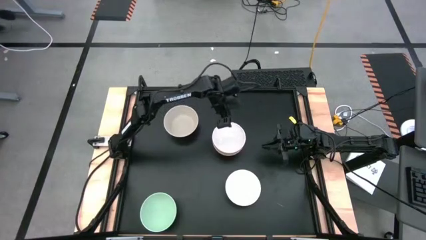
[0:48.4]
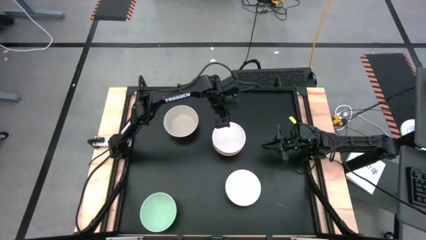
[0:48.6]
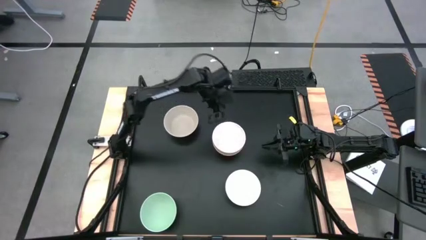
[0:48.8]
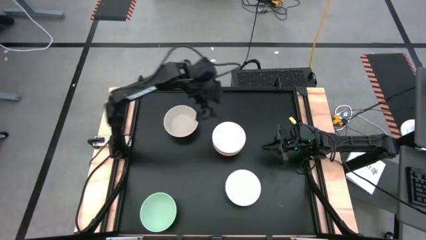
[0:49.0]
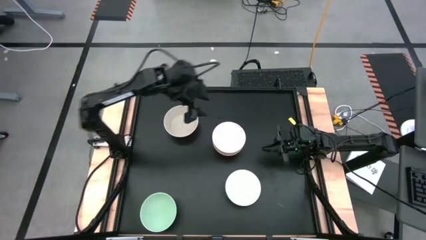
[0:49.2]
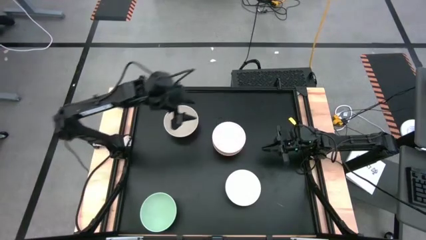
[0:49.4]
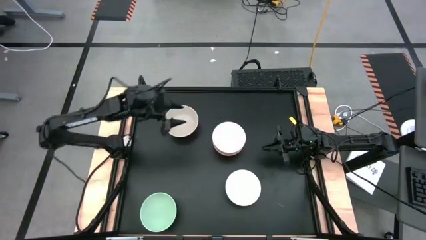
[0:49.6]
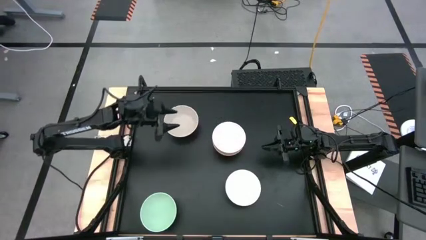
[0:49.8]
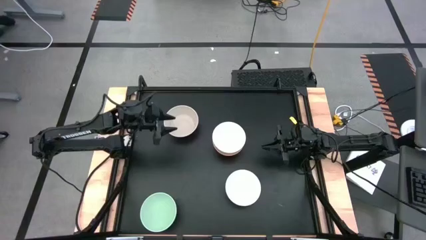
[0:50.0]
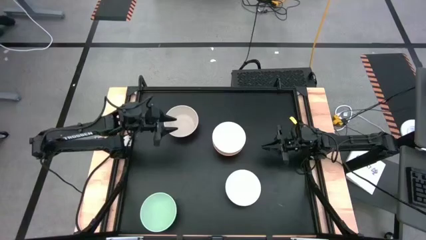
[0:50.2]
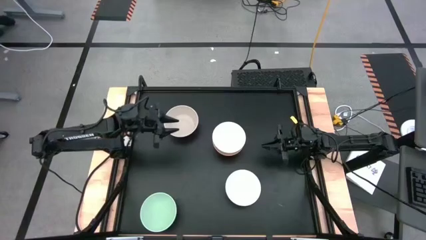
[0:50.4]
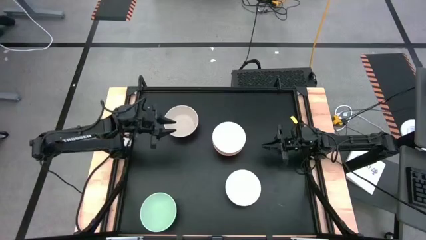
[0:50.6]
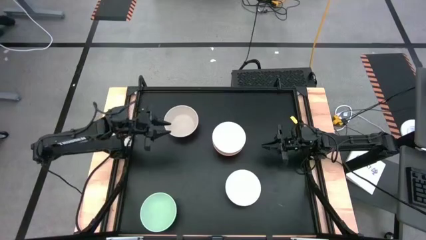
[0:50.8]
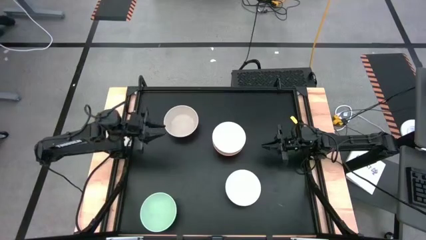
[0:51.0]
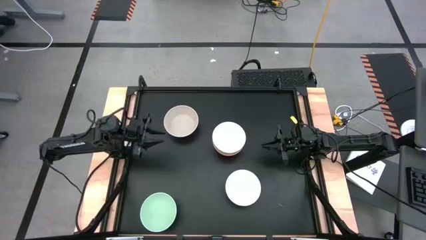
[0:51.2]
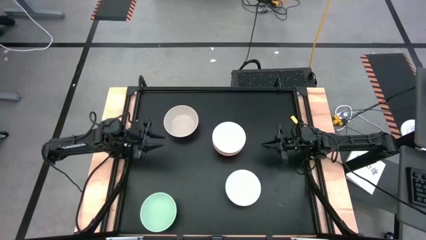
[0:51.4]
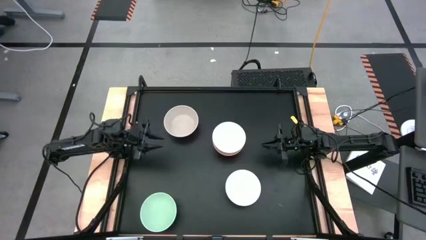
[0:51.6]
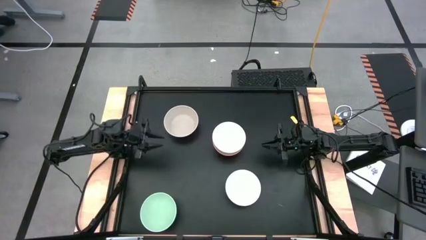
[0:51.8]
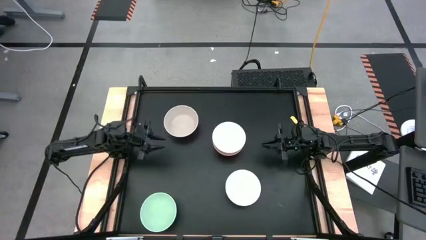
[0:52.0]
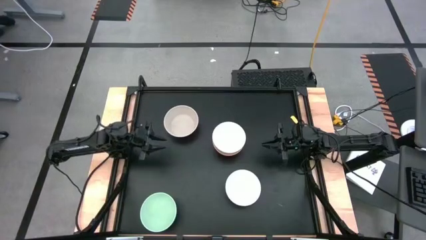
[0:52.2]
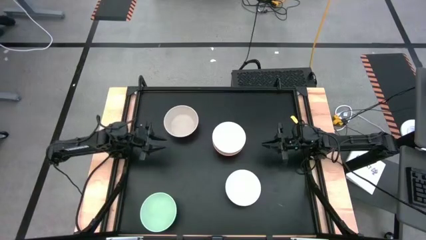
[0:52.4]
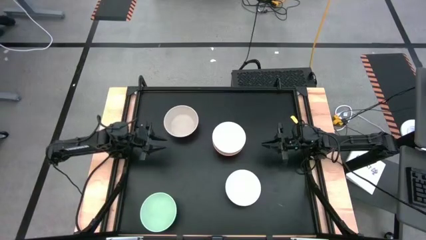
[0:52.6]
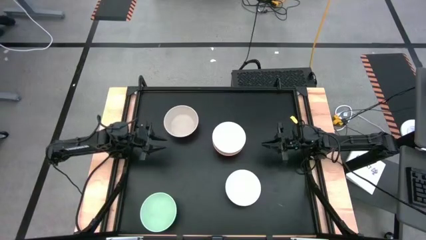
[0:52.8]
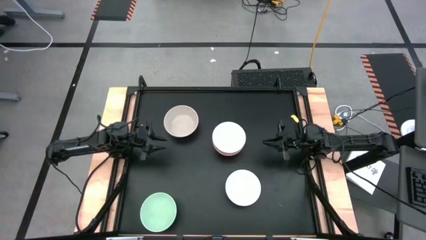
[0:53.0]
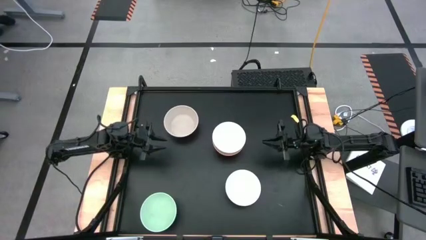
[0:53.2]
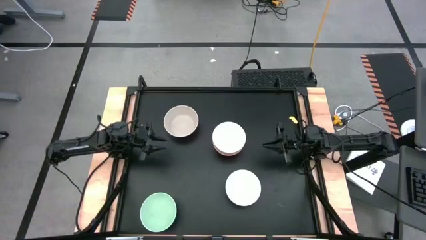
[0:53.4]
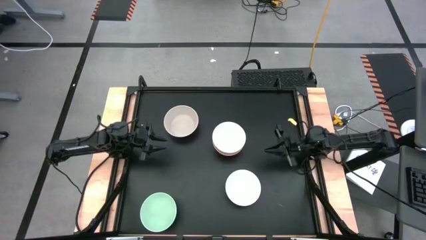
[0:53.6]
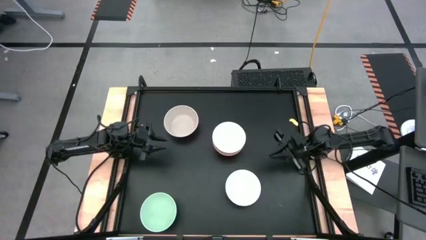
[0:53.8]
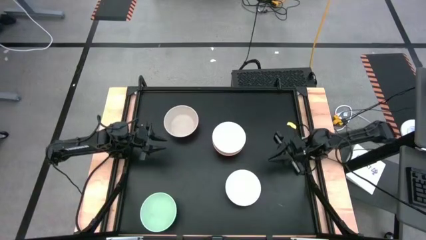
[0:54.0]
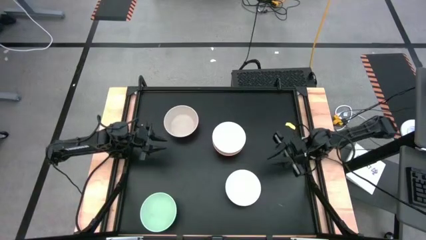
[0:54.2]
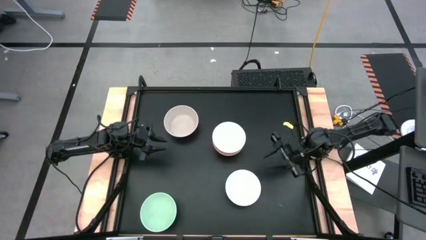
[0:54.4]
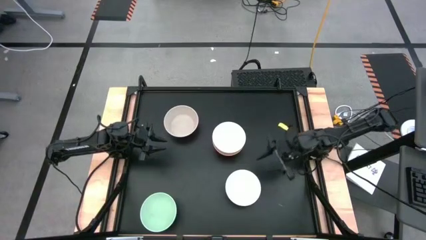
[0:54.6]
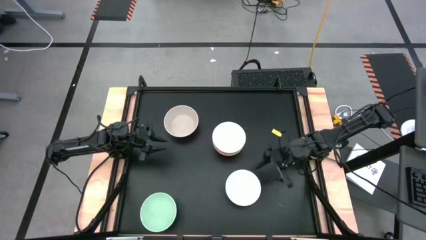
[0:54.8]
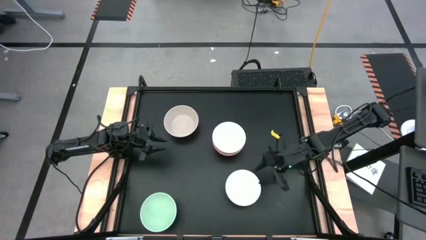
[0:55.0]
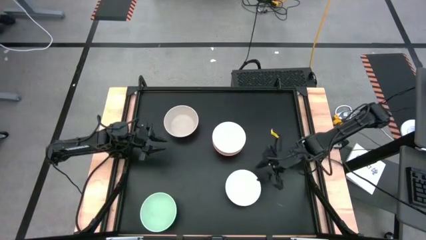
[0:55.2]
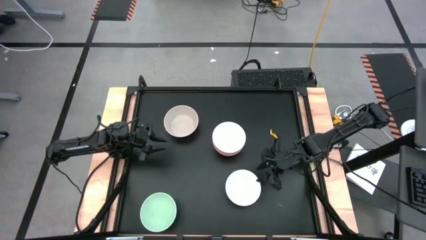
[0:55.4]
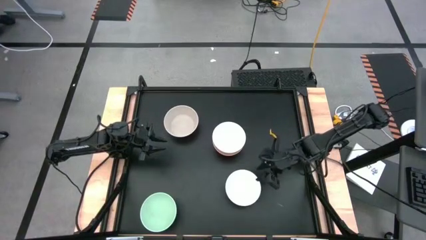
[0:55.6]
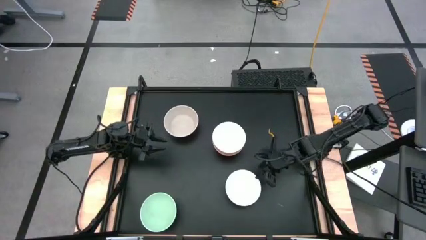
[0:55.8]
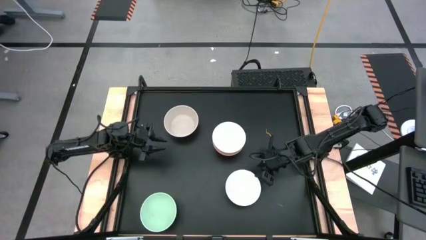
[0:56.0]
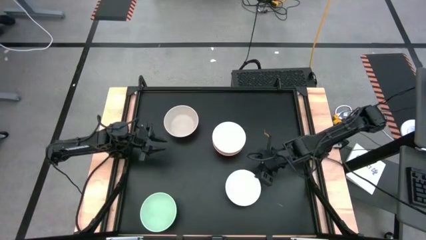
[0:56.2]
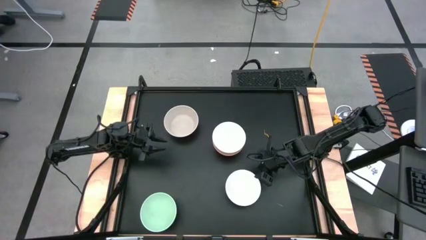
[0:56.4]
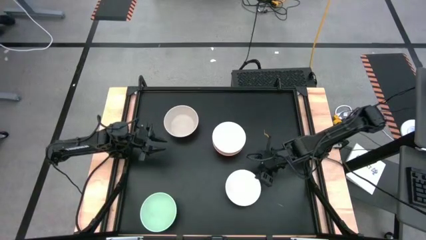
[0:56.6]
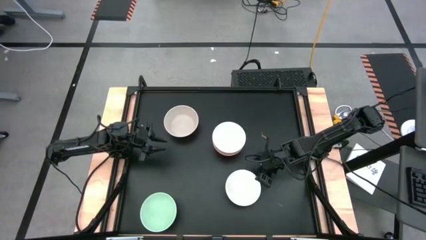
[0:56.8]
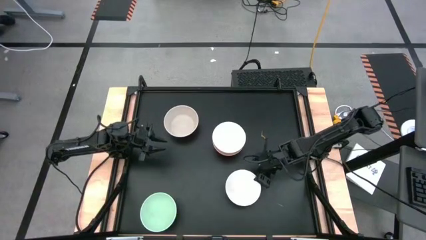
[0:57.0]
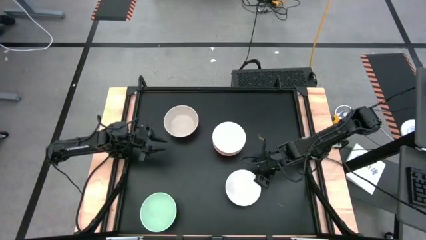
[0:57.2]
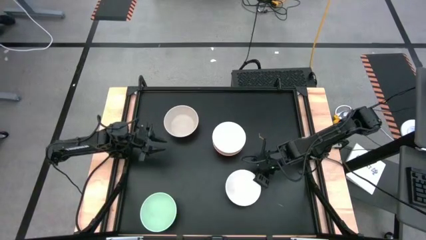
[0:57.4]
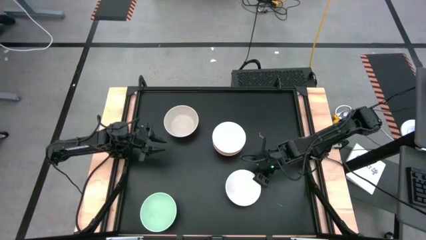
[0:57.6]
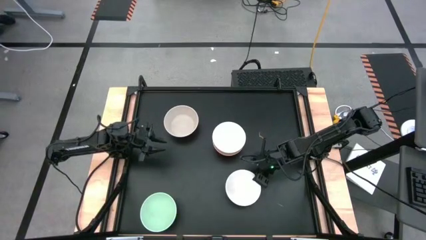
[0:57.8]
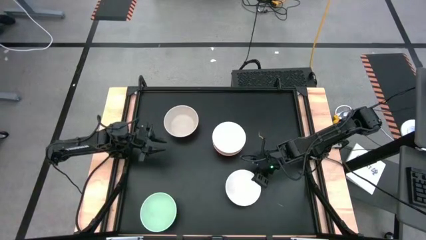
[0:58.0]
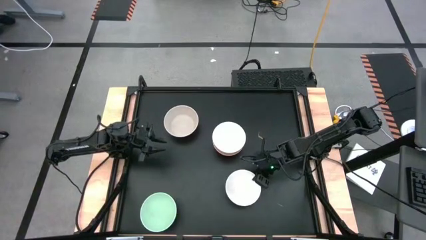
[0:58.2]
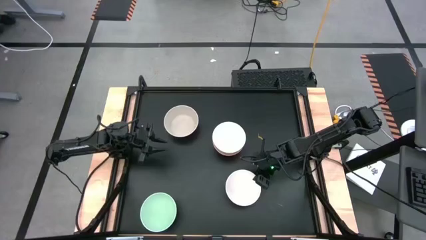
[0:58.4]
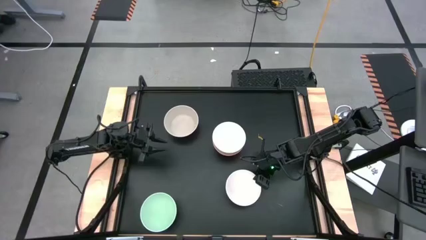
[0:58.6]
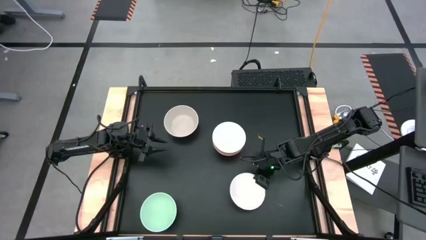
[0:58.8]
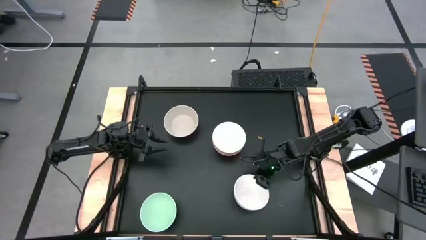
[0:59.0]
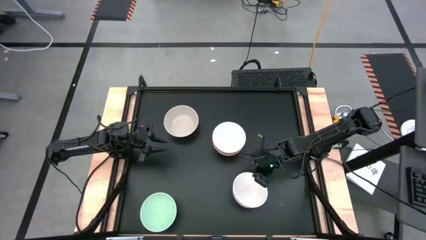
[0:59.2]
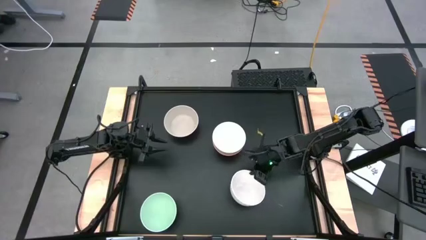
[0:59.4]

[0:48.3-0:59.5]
Task: Nest bowls inside each other
Stack the bottom white bowl on top of the white bowl

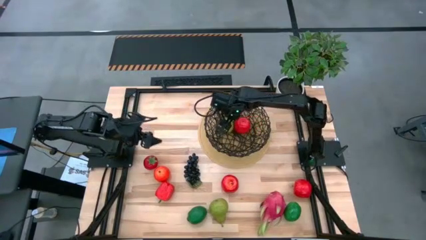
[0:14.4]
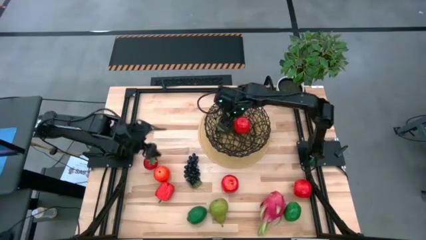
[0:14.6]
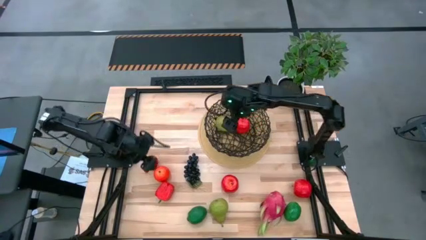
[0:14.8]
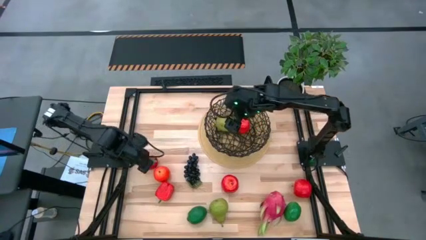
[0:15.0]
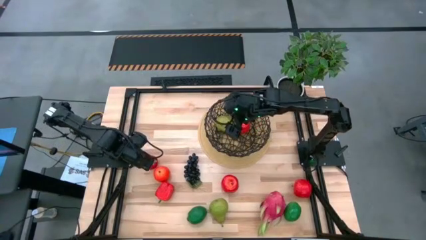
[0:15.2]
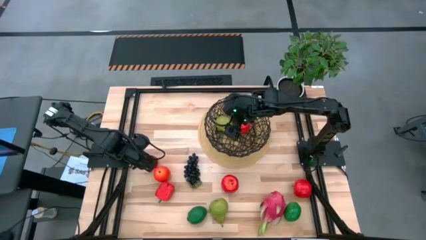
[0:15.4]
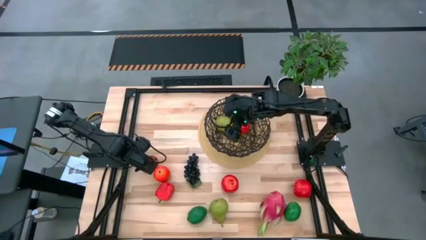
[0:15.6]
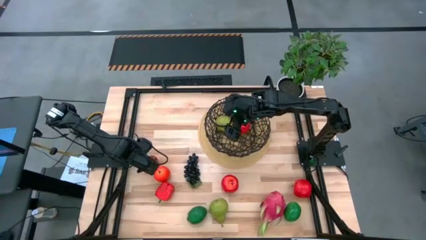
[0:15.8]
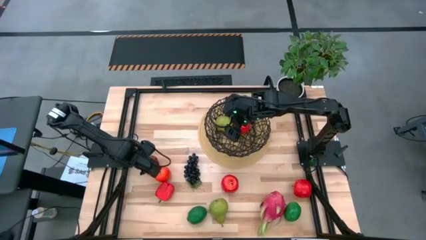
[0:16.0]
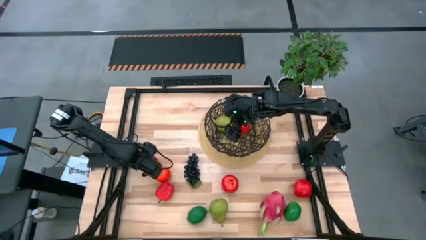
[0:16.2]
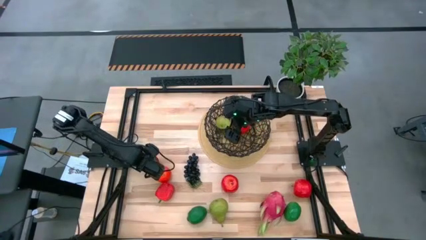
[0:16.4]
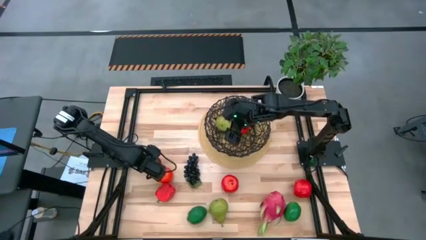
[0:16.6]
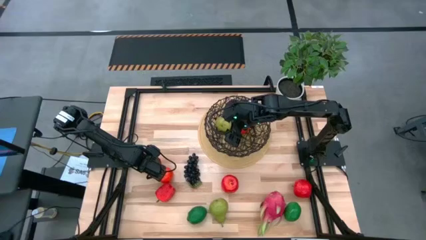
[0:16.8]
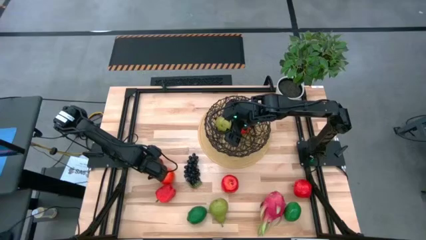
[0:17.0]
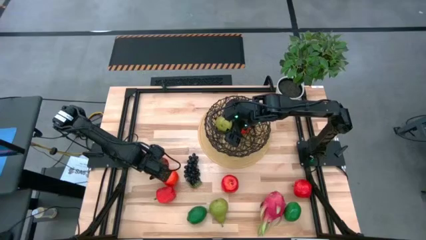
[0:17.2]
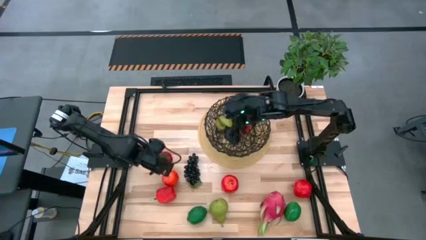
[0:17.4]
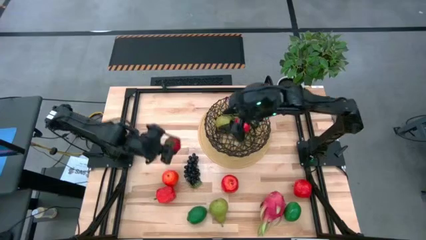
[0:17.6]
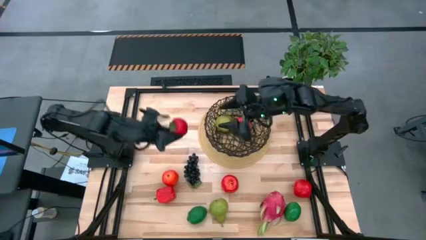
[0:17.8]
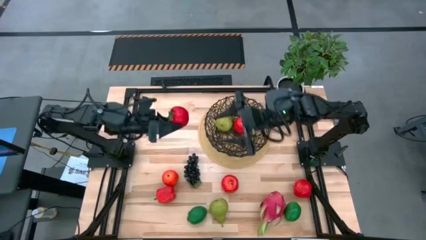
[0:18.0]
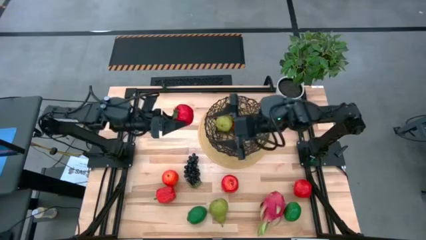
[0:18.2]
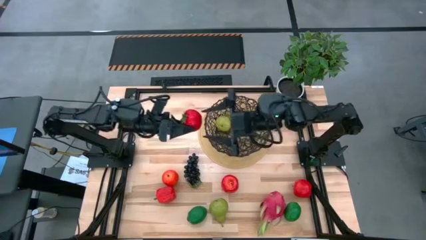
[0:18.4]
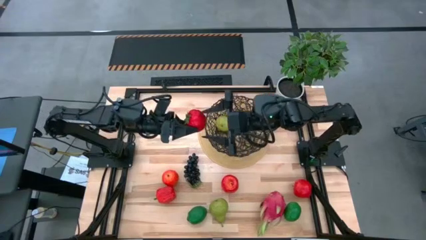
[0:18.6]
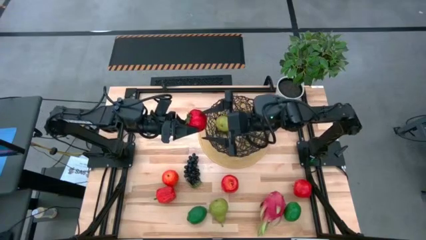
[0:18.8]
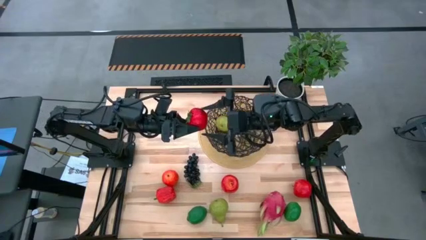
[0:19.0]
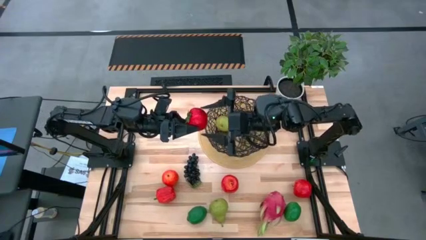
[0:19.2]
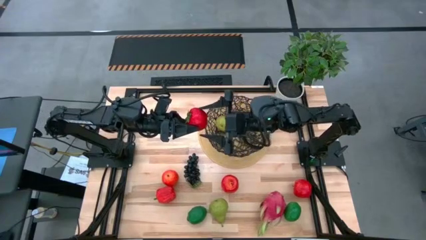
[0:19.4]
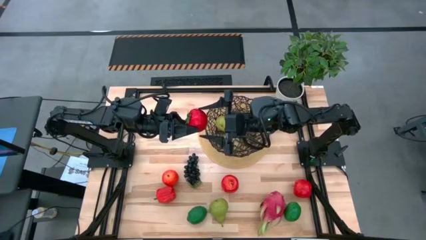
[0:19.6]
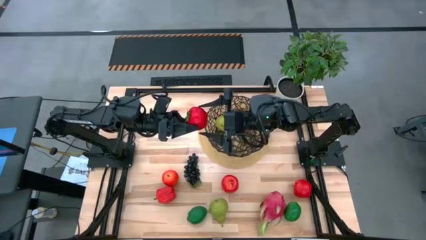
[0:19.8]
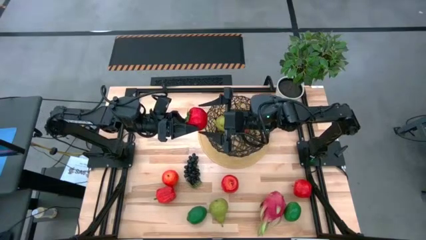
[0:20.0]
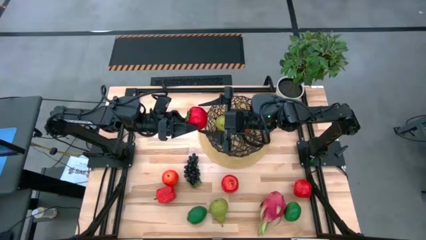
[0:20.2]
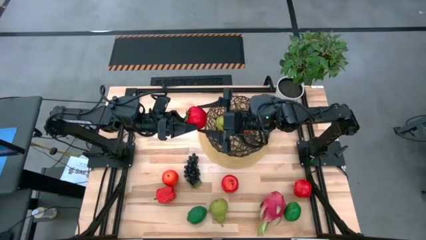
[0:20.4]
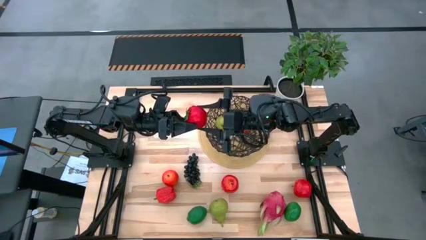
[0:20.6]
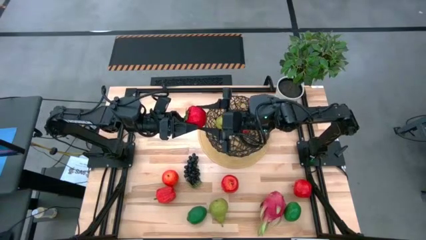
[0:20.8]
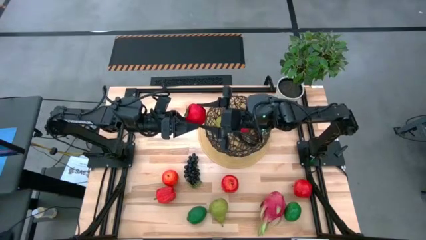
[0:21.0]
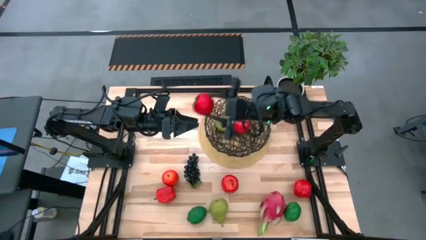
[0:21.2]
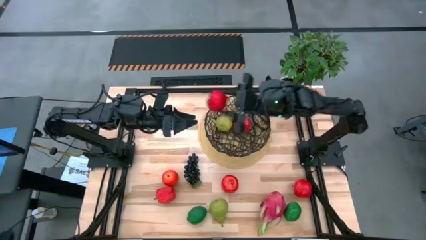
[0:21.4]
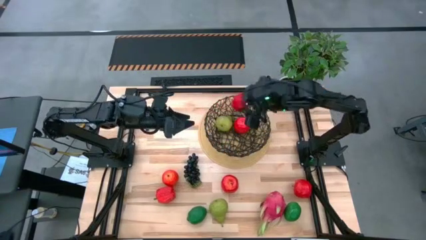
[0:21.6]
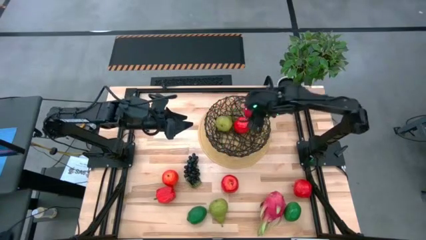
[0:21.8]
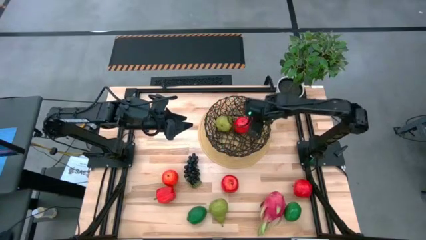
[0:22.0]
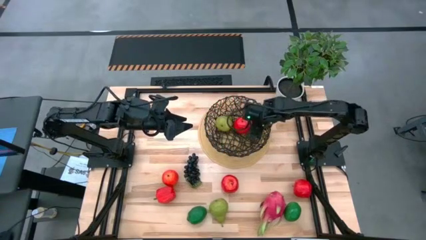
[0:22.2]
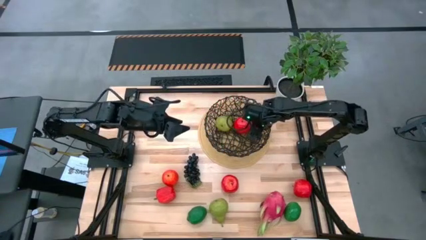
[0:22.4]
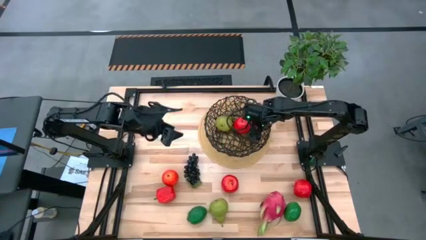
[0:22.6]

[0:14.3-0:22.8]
Task: Build produce basket
Put the red tomato into the black basket
